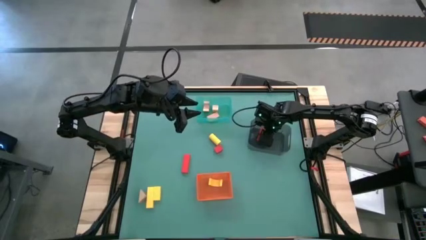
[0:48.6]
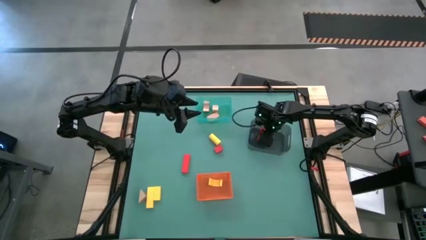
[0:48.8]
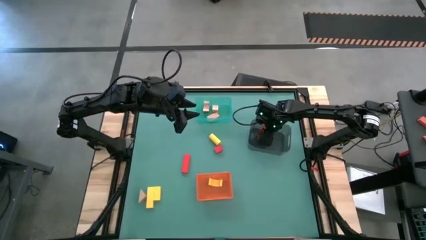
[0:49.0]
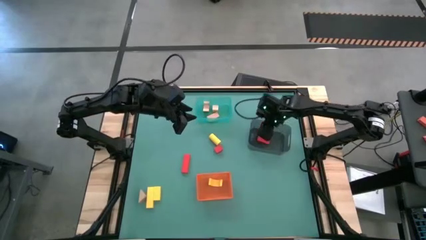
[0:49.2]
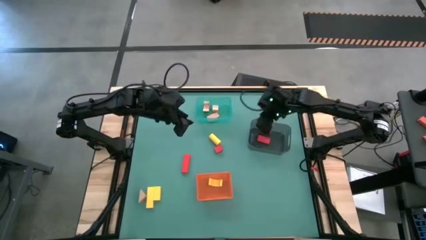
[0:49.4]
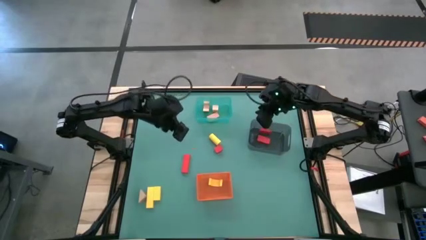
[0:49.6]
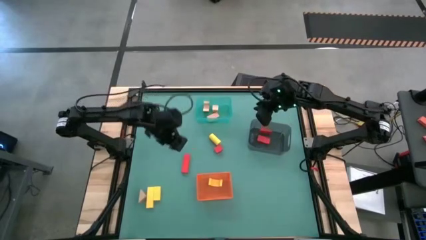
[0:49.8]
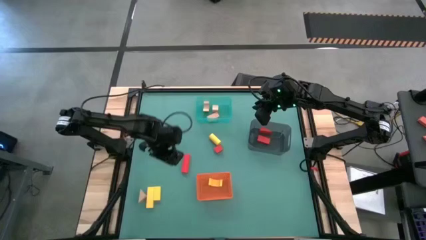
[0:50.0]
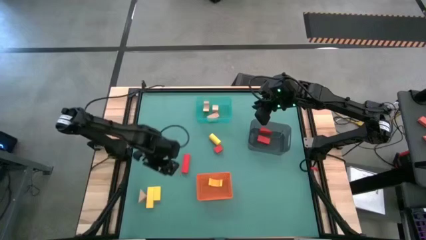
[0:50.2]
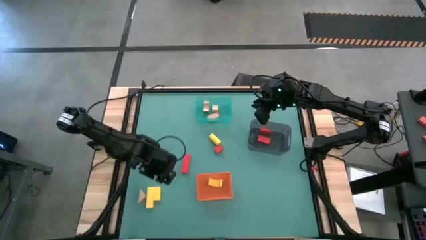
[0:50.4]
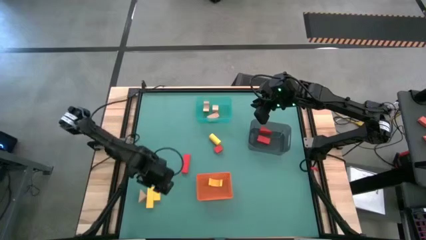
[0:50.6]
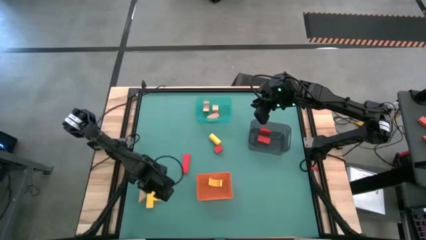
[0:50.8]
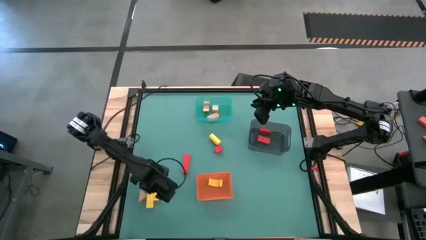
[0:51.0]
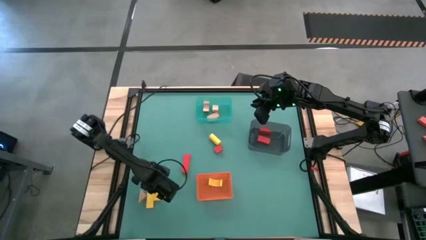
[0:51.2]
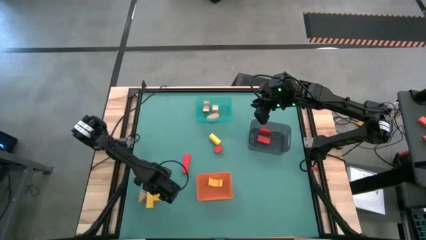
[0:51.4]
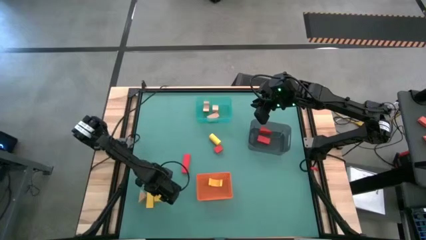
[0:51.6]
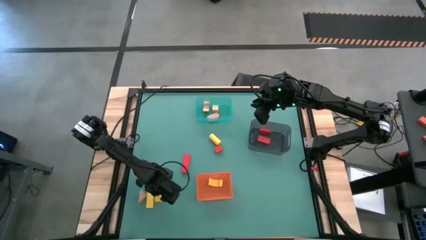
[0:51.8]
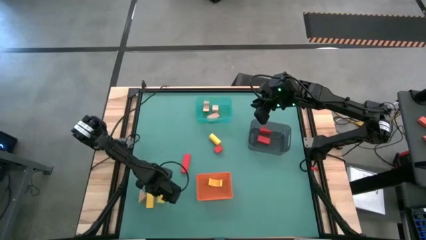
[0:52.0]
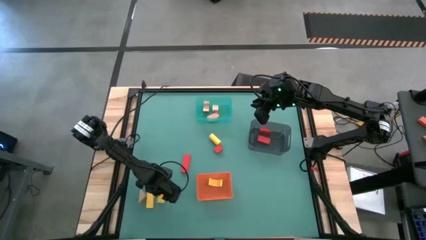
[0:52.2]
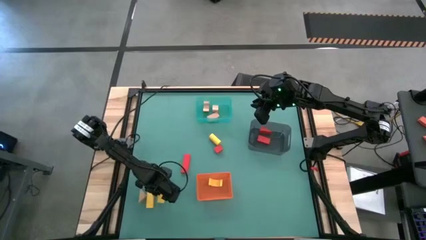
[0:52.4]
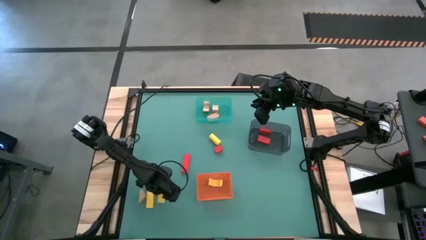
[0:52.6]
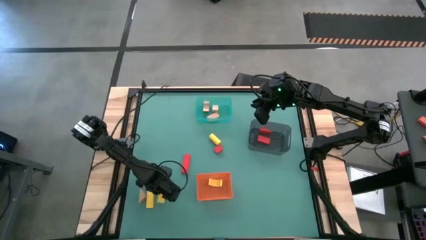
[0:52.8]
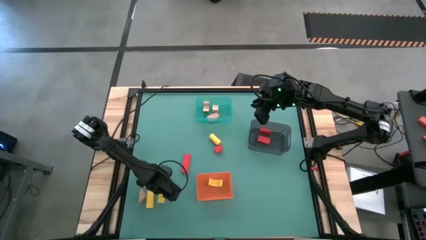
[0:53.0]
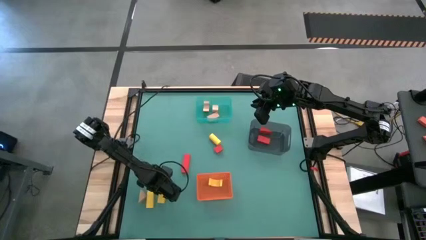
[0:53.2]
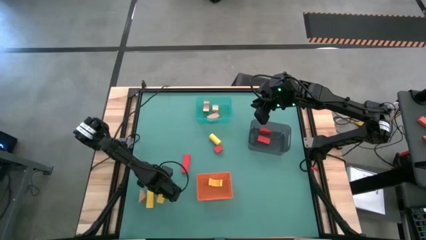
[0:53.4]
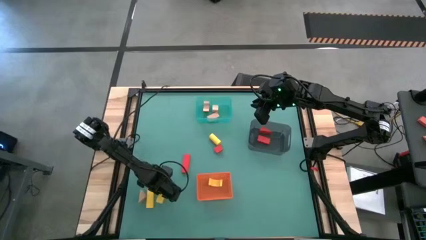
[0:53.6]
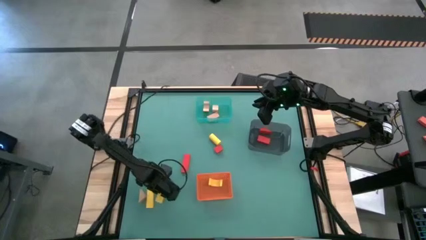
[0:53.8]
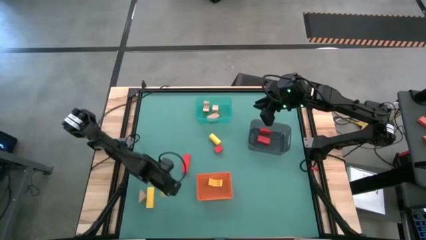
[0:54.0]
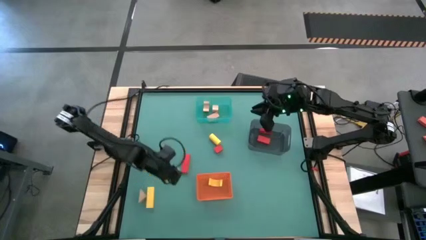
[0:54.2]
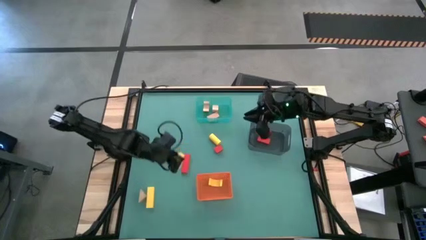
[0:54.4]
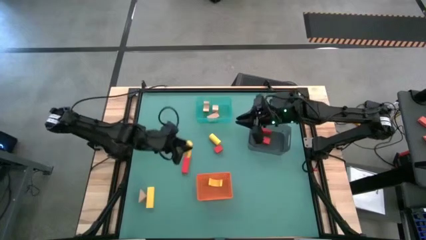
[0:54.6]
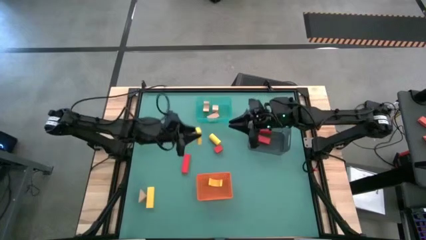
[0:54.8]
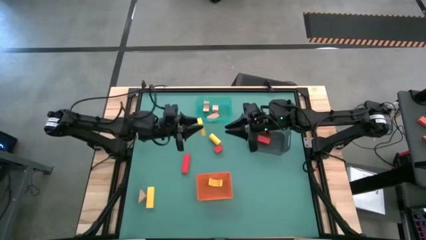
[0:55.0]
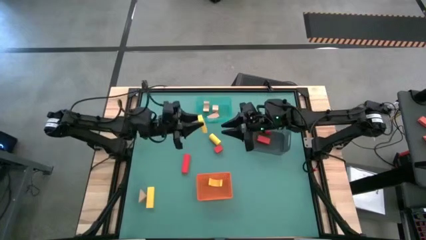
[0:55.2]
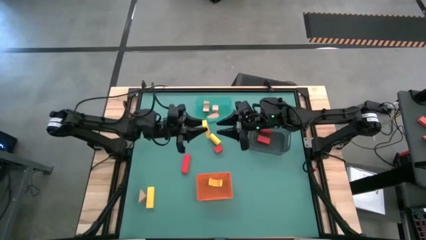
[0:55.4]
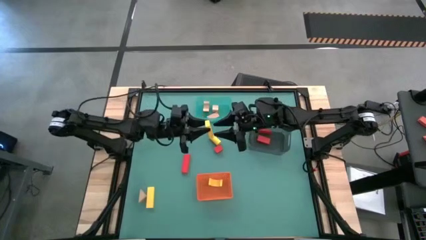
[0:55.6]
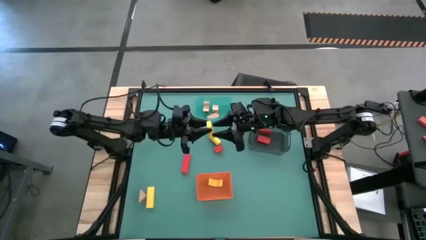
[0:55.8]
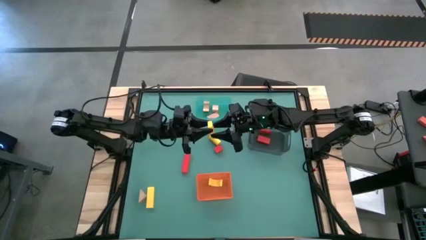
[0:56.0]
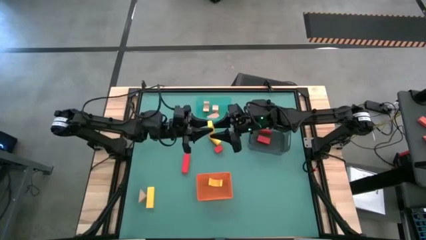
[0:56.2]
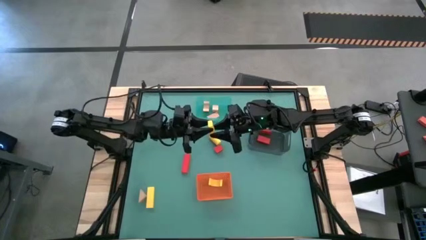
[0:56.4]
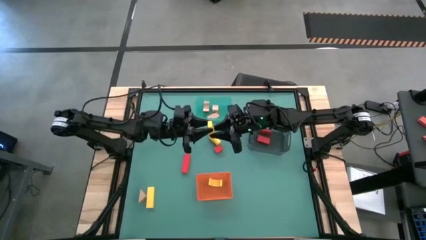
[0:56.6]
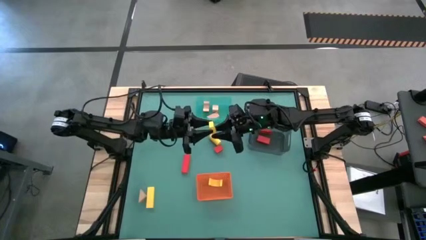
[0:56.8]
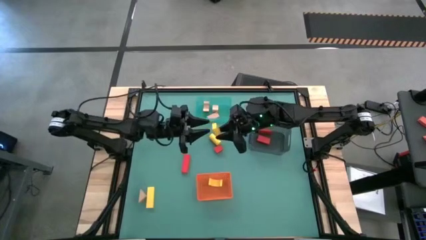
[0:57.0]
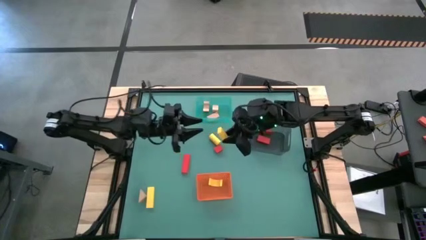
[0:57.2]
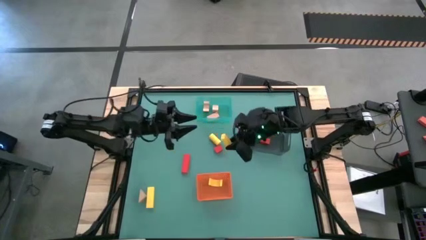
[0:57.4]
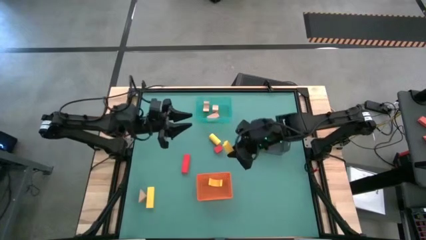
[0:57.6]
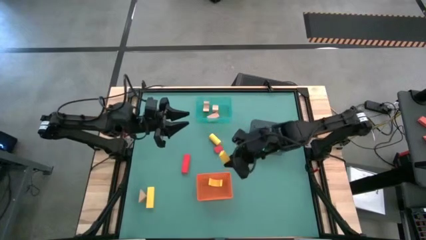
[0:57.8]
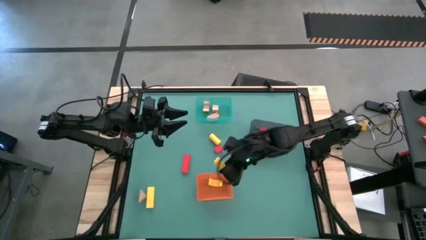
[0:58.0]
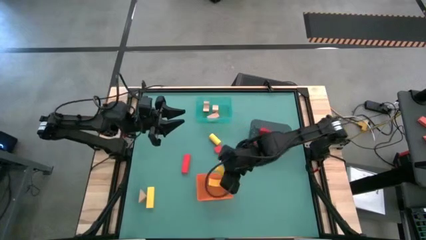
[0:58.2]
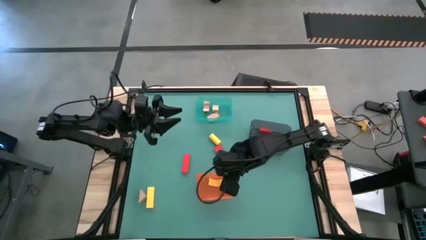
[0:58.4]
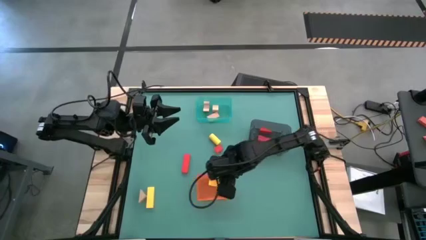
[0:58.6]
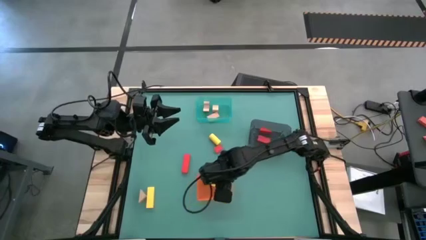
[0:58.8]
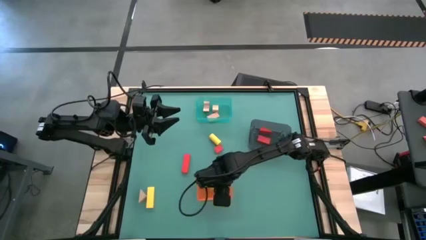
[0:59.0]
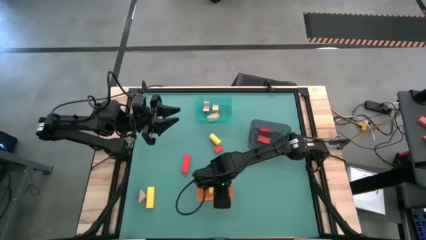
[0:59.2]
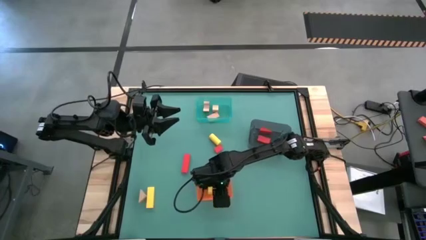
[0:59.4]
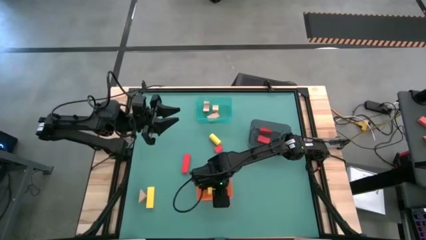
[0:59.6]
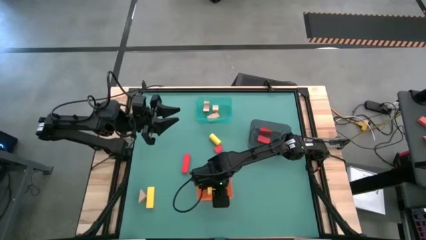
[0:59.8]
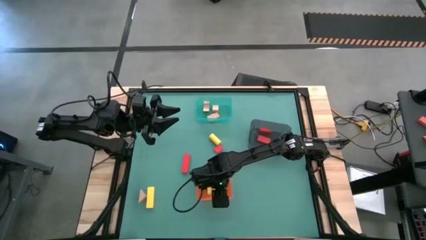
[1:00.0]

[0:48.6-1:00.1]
Task: Sort & place blocks by color
Put the yellow block into the orange bin

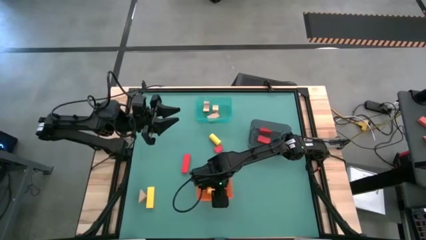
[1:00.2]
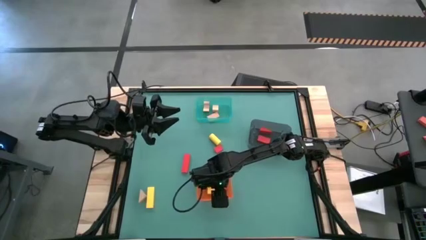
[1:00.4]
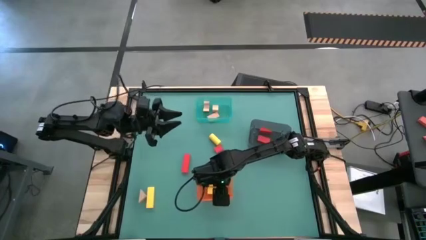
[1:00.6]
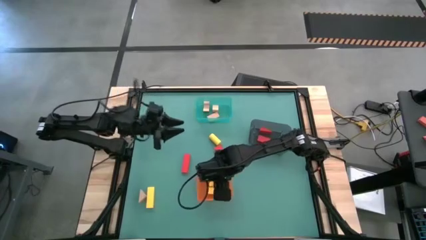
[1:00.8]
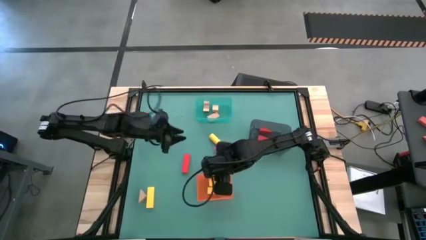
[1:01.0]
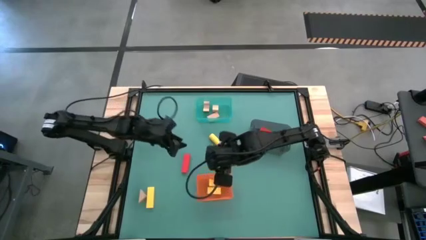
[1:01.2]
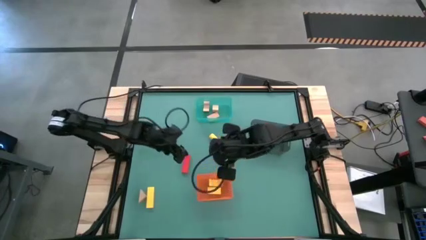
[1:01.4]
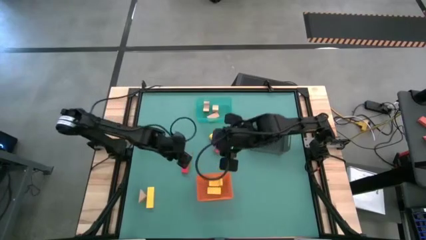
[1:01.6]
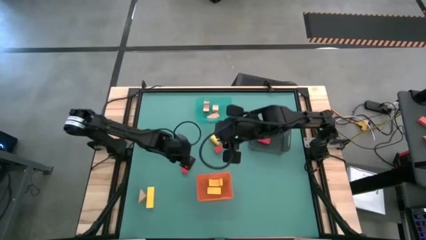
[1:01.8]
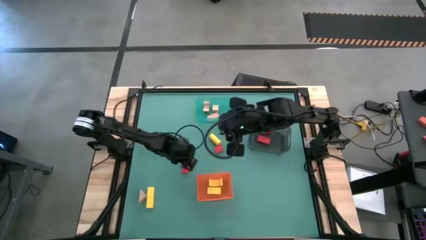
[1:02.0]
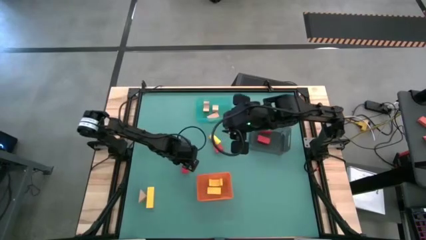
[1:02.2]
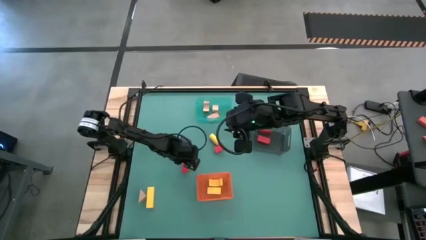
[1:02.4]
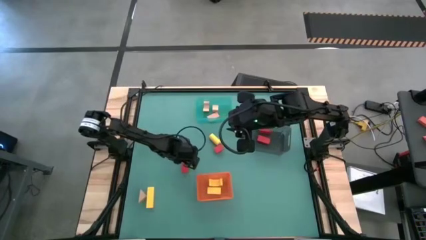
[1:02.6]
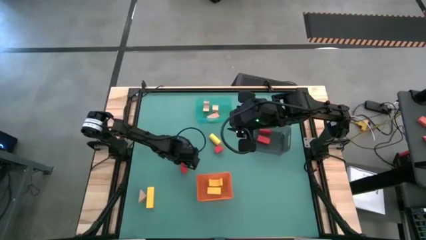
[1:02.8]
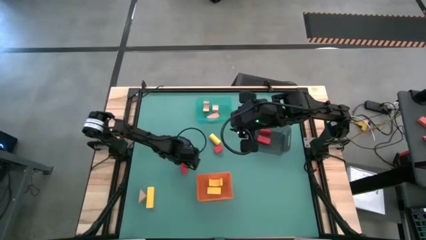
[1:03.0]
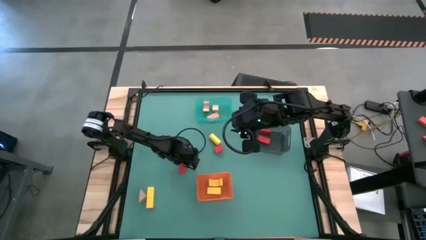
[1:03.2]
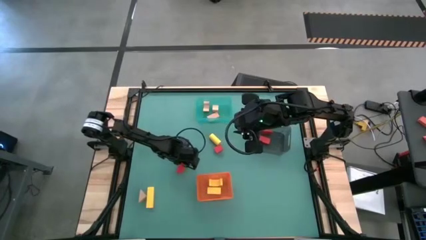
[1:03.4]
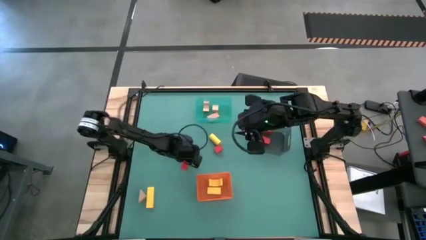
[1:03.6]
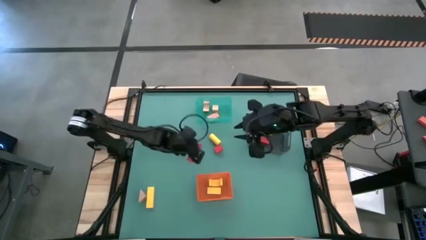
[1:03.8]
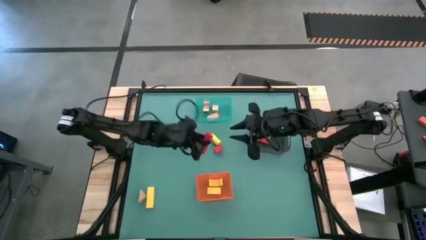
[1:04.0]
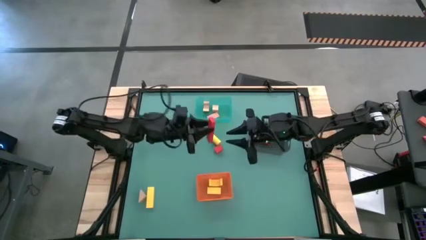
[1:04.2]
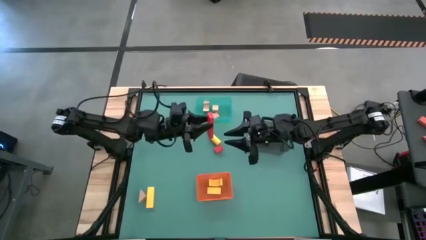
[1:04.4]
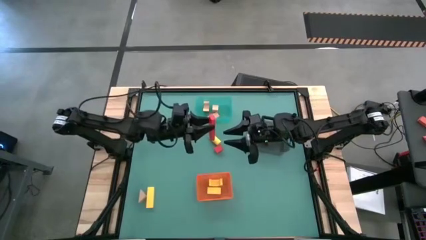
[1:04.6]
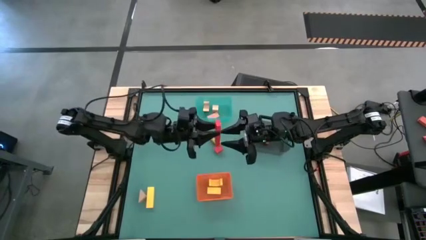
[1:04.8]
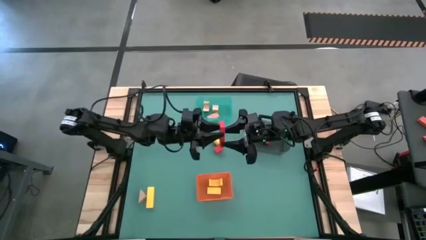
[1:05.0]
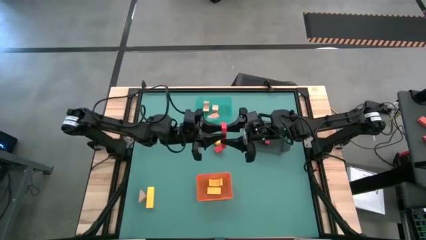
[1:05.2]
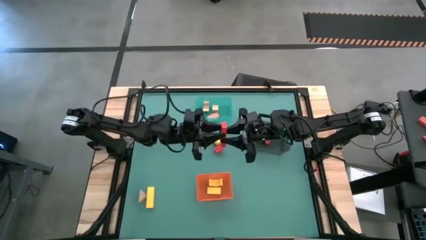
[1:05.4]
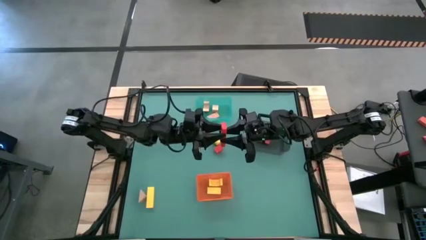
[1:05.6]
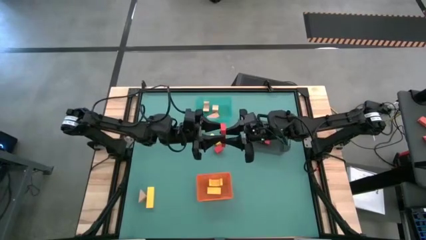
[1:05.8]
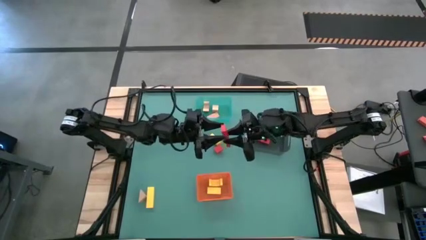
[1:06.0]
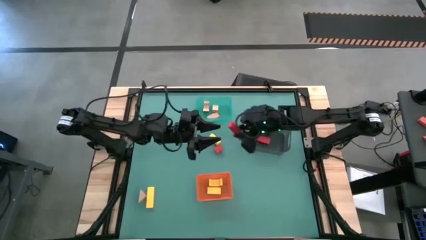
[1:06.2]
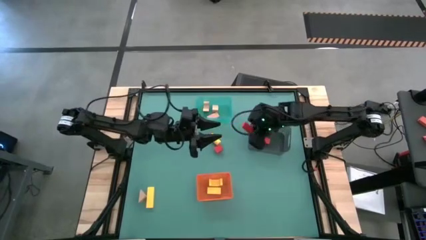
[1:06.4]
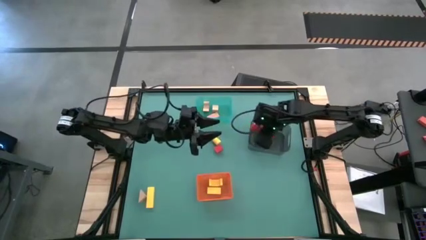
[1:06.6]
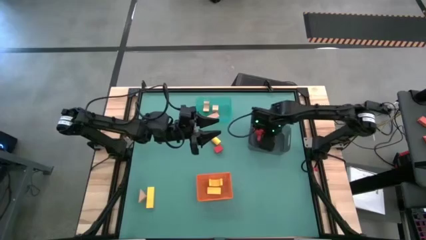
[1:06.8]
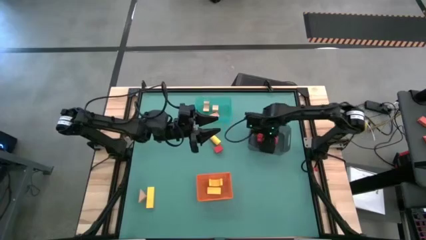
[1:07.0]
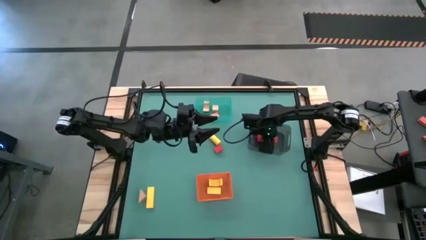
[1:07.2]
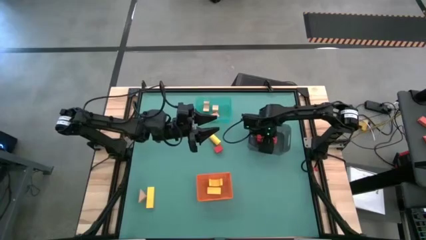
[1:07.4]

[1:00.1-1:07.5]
Put the red block into the black bin
